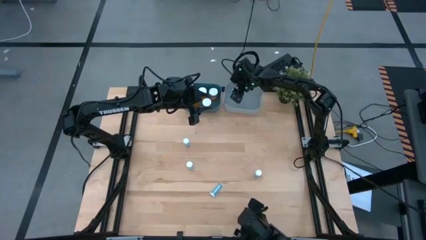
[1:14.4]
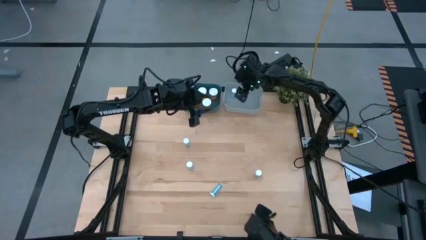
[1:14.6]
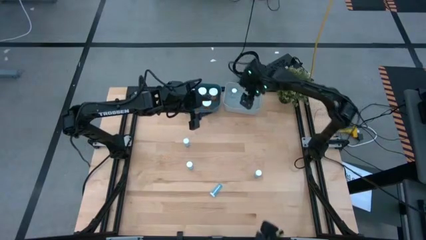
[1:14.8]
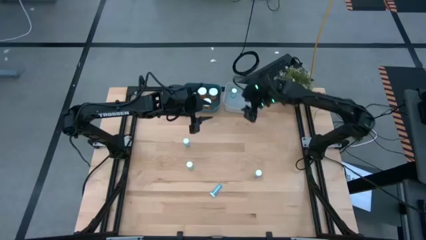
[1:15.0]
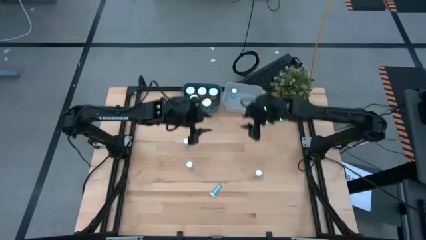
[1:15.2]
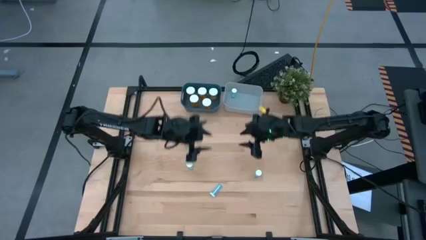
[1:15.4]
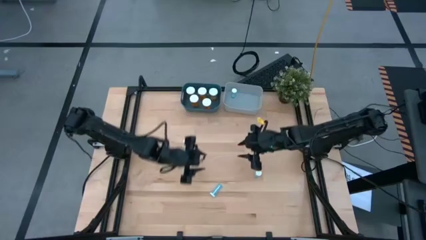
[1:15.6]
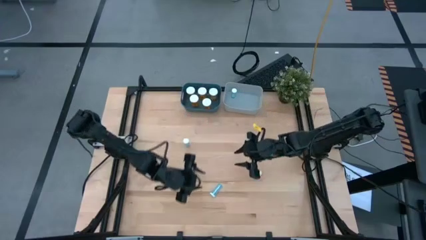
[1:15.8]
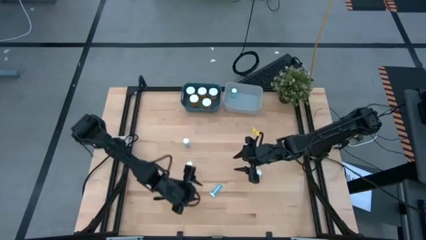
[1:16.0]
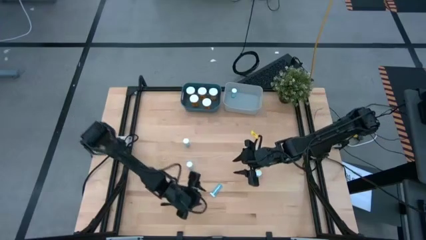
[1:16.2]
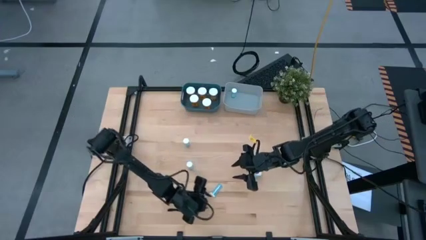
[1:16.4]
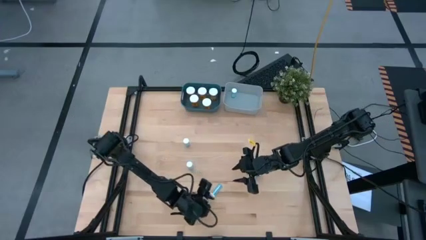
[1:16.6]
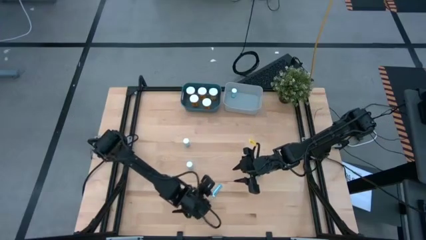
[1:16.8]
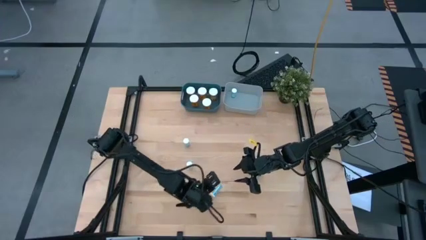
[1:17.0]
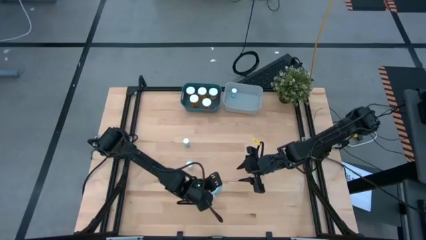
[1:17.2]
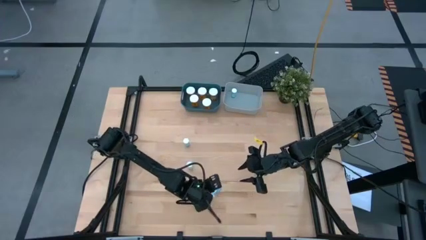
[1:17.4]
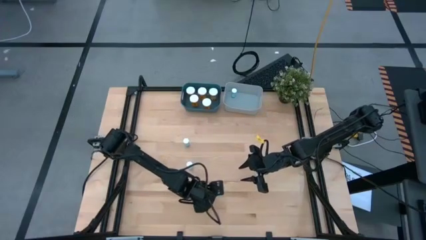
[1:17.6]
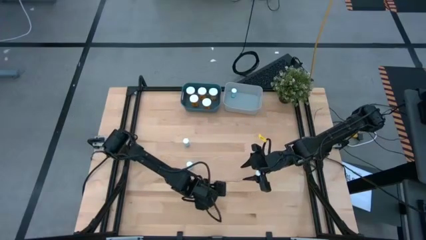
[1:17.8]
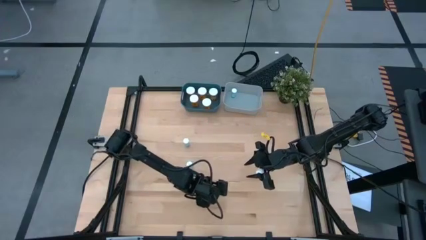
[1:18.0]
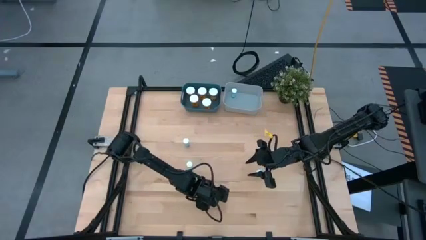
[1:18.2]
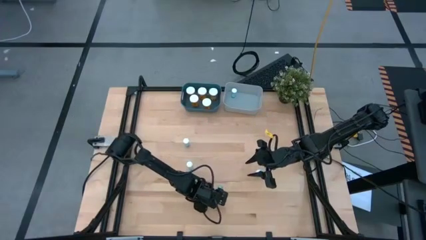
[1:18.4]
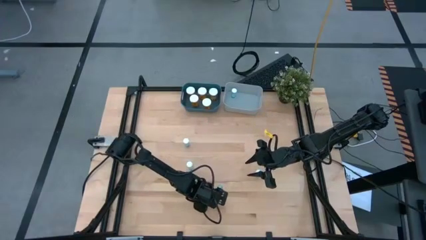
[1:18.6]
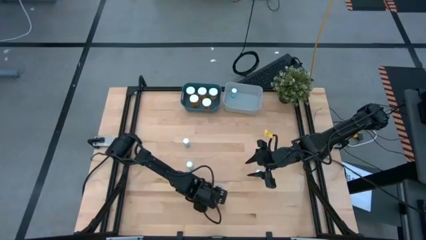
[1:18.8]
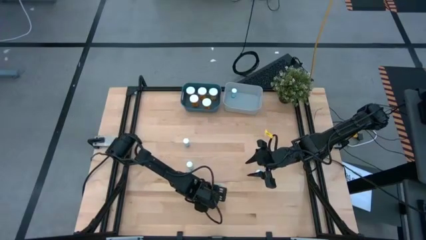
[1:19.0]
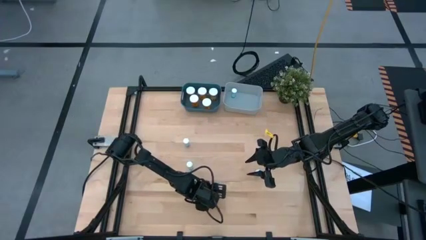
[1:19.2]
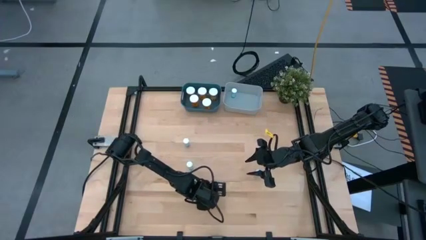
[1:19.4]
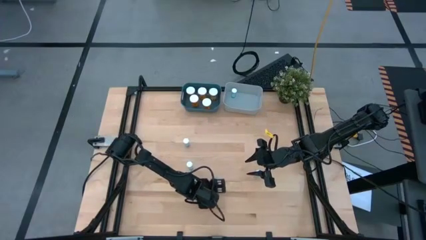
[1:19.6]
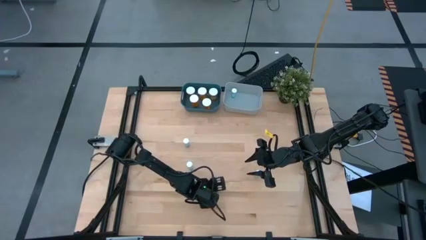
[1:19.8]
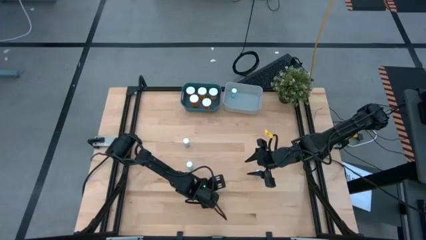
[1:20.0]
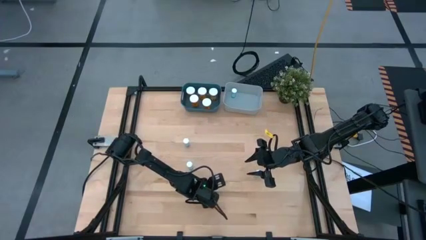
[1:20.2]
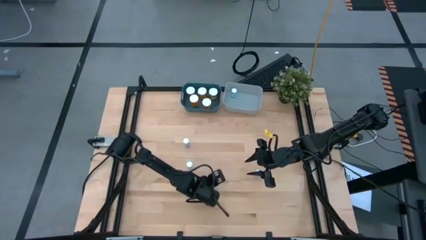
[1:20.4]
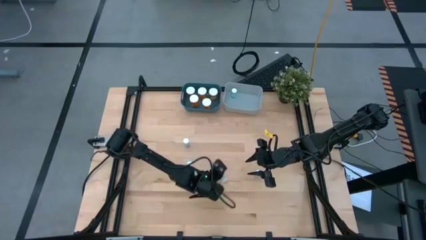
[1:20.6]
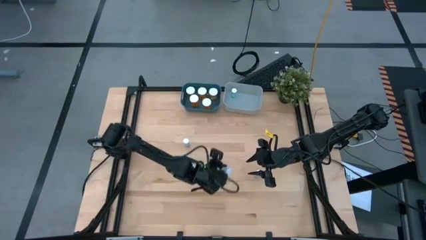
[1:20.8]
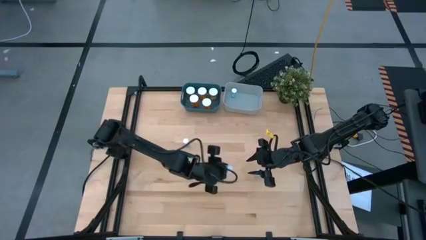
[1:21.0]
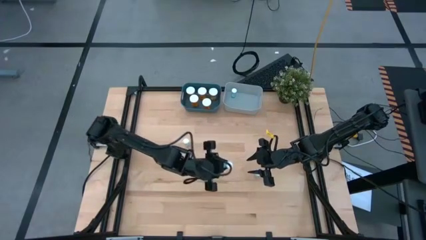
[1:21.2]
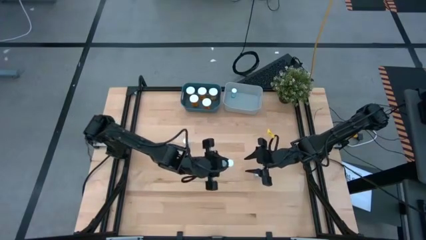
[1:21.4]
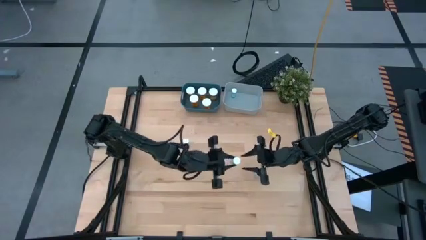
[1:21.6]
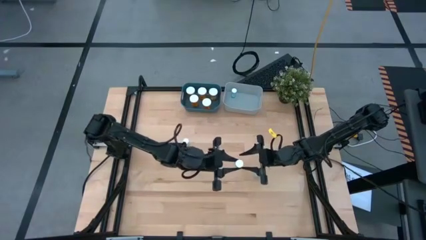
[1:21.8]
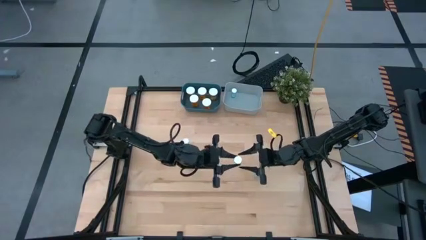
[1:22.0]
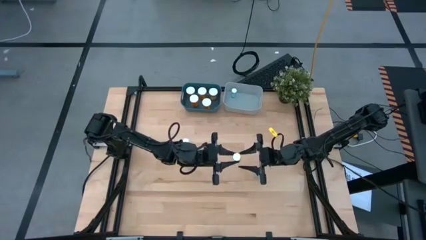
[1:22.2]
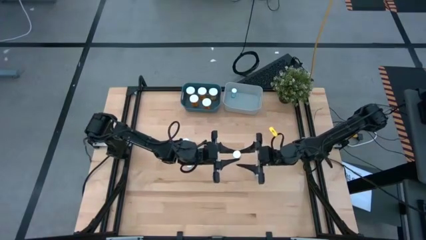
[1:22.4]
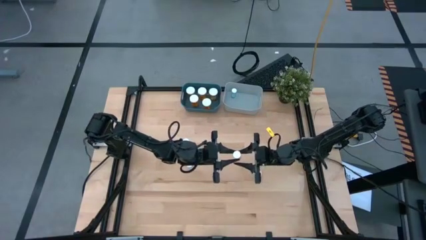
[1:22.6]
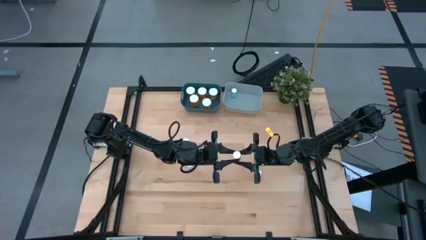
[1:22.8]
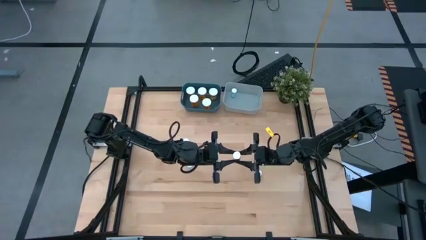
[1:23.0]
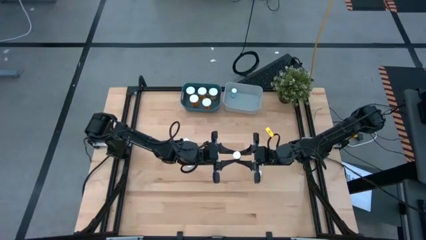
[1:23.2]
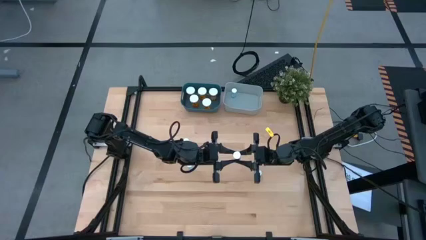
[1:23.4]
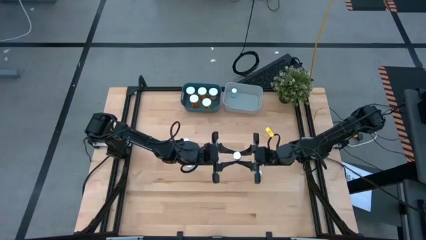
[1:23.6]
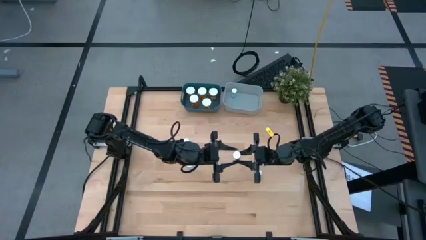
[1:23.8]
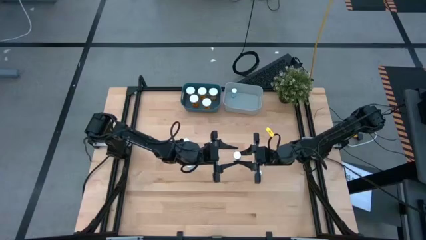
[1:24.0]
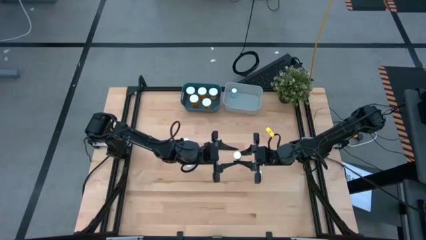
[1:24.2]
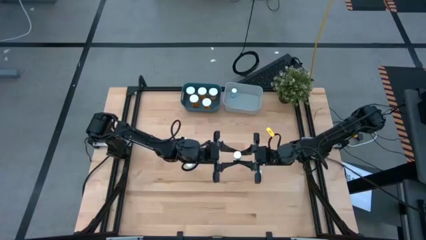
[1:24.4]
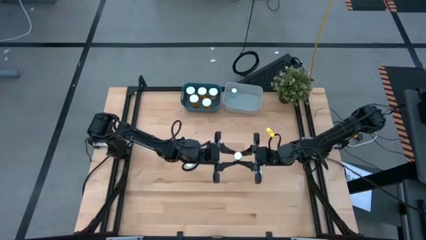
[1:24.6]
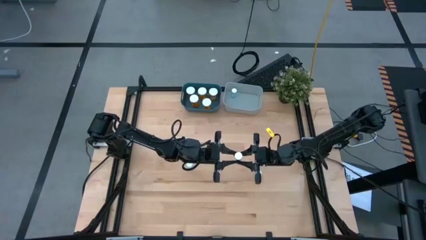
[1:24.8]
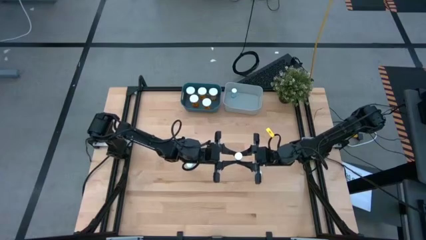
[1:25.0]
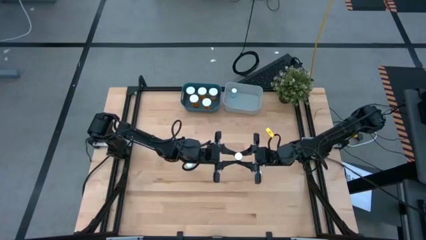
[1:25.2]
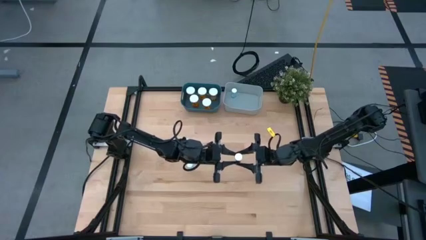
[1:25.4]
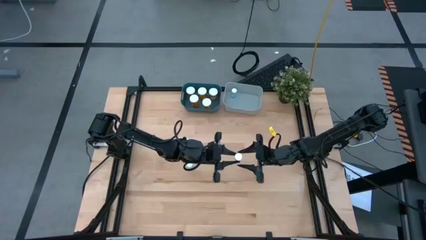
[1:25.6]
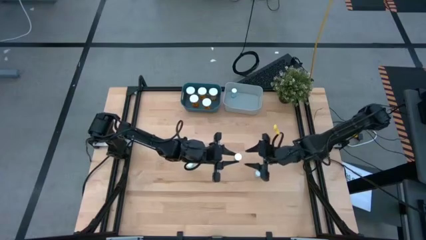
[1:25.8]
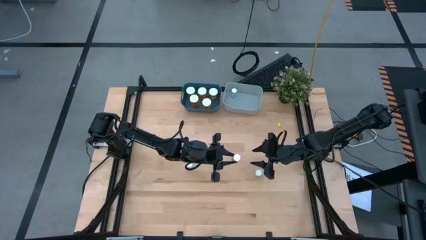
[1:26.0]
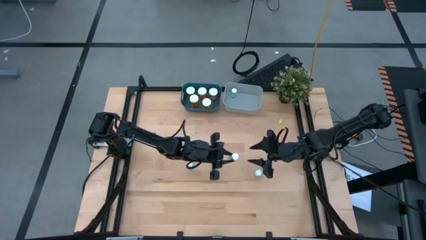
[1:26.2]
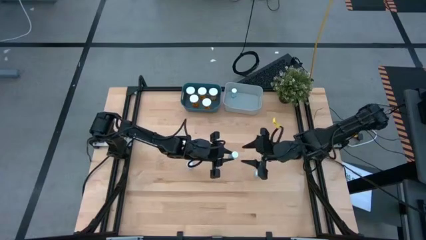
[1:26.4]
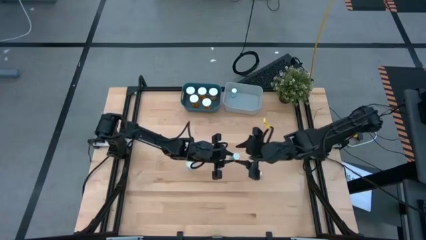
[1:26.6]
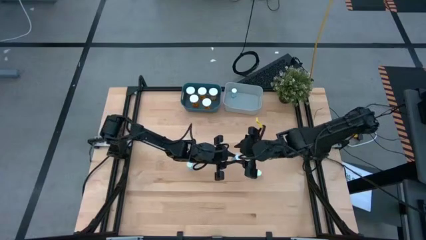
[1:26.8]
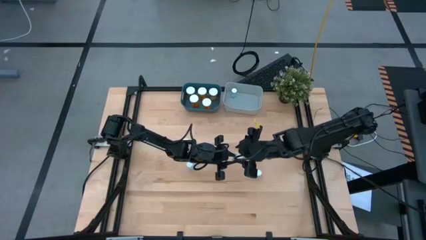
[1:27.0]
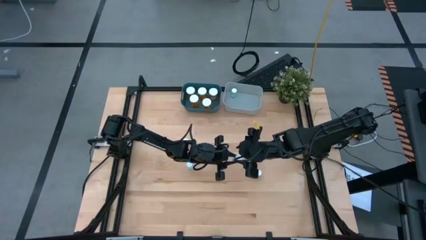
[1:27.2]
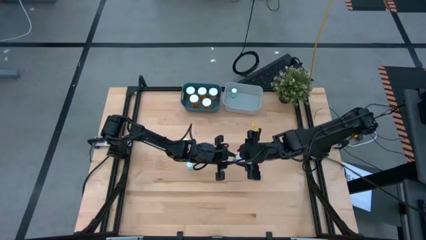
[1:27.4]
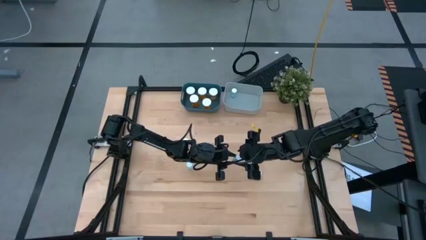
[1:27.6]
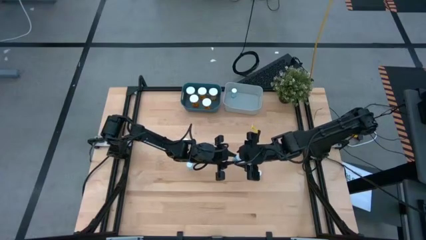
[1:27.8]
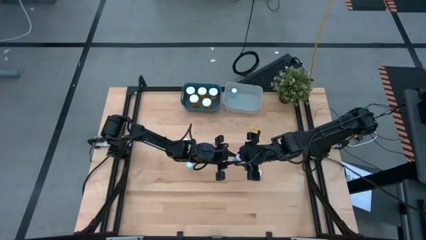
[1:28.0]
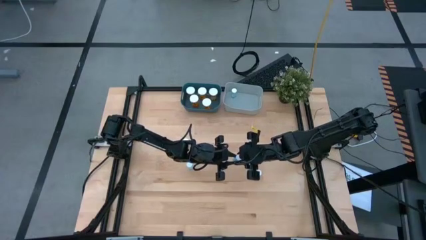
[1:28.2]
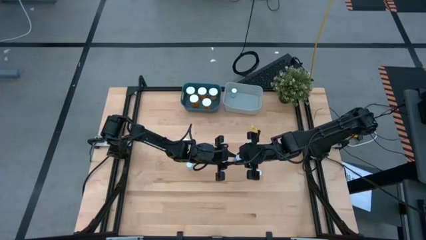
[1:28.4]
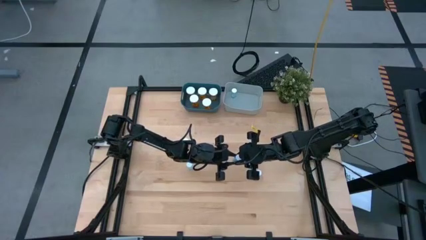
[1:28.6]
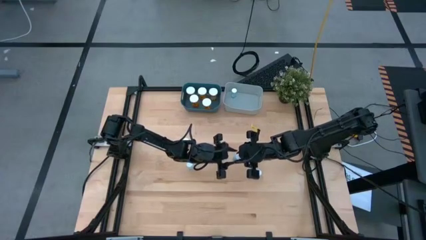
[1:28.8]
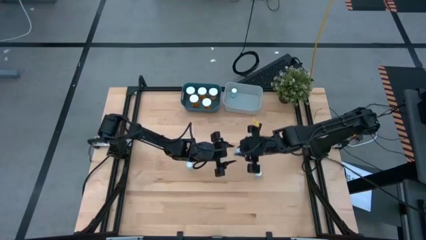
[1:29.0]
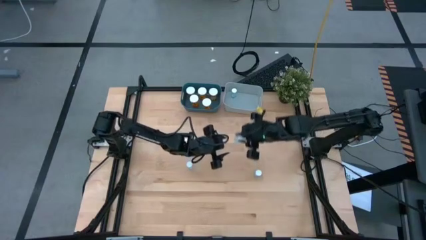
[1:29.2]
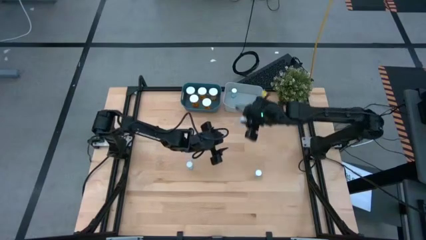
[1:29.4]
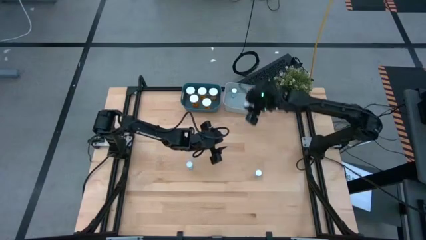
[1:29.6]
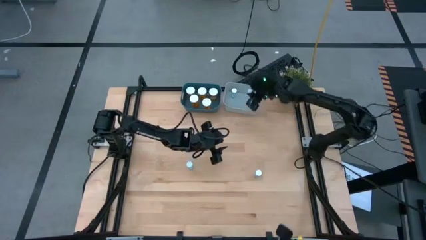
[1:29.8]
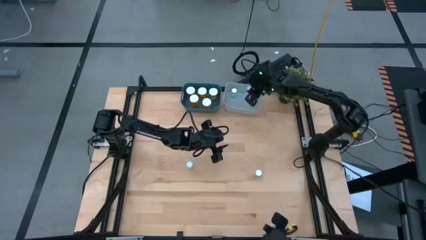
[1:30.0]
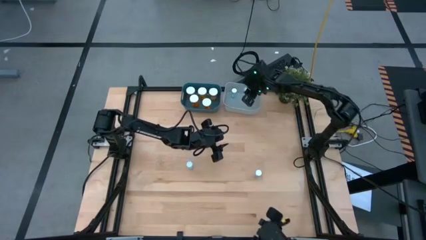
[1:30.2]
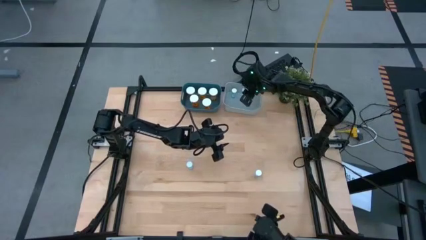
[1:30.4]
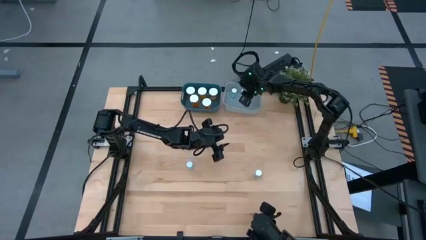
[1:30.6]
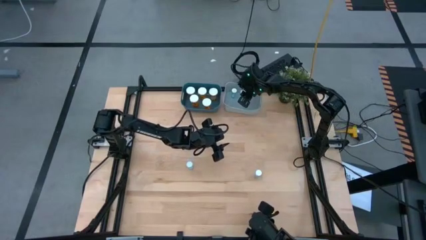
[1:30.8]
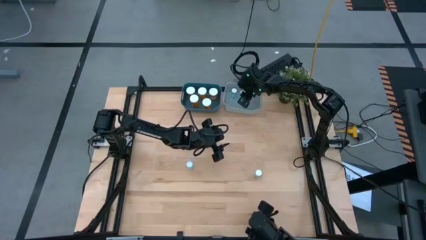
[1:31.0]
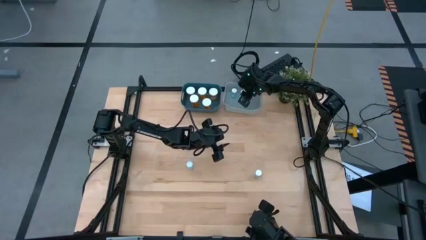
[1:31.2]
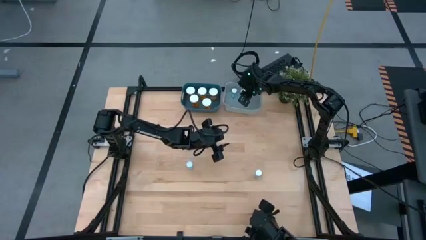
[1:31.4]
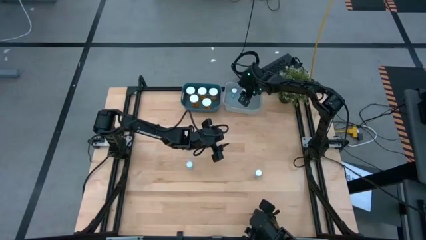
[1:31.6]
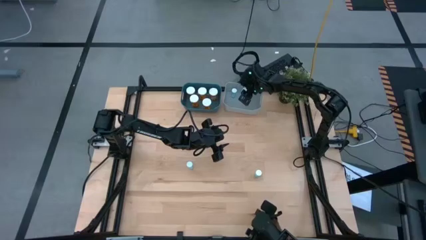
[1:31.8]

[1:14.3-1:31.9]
Task: Pick and place medicine bottles into bin by pill shape (circle, oval)
Put the blue pill bottle into the gray bin
